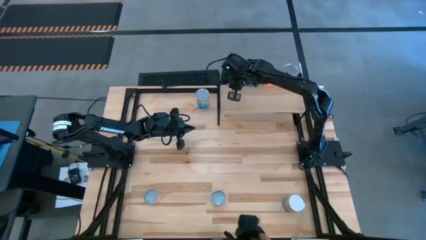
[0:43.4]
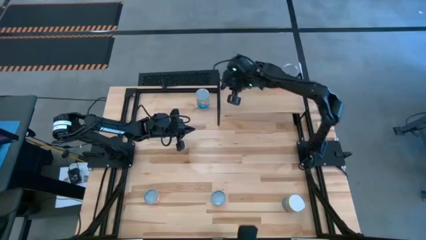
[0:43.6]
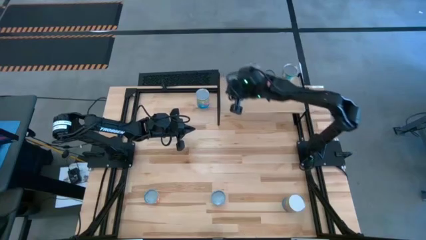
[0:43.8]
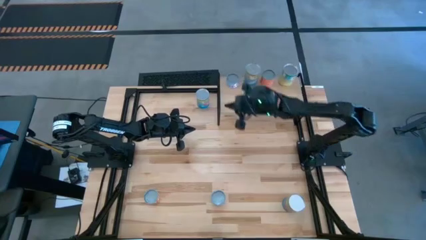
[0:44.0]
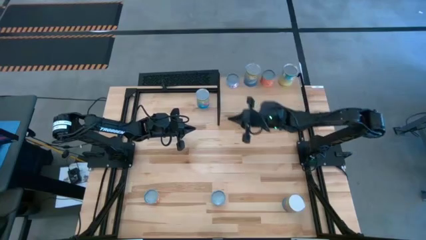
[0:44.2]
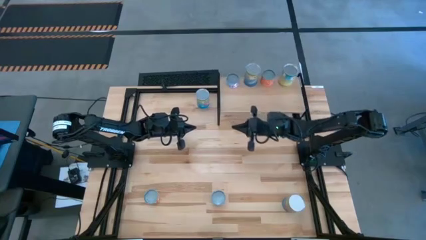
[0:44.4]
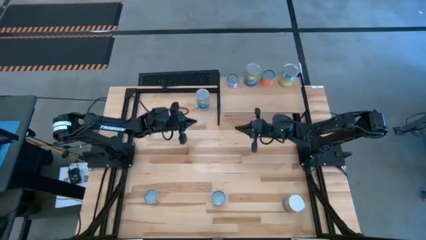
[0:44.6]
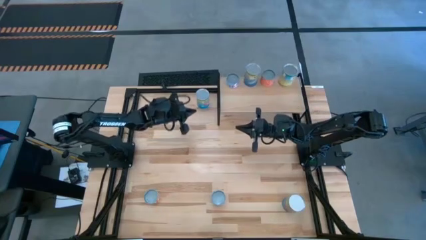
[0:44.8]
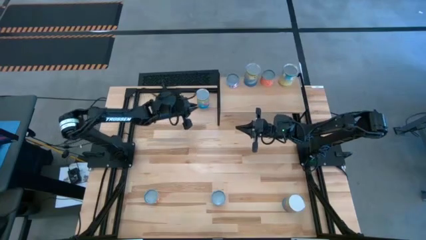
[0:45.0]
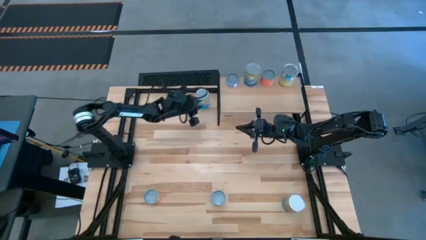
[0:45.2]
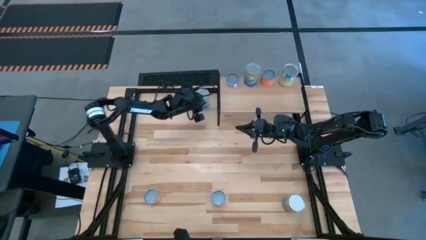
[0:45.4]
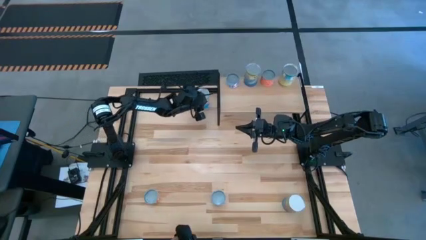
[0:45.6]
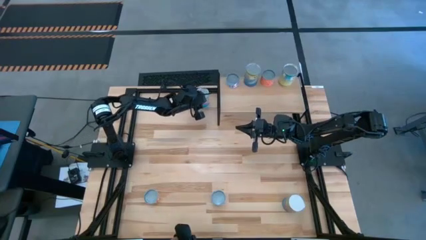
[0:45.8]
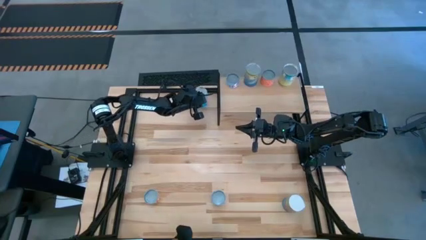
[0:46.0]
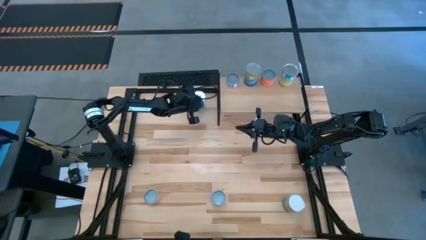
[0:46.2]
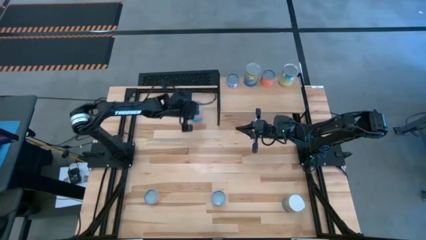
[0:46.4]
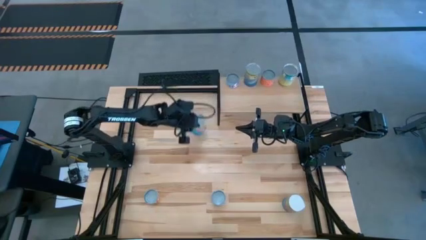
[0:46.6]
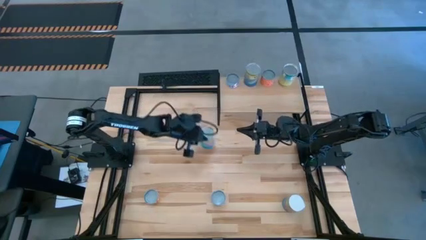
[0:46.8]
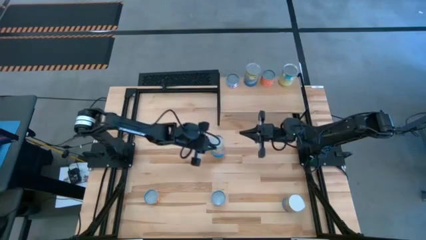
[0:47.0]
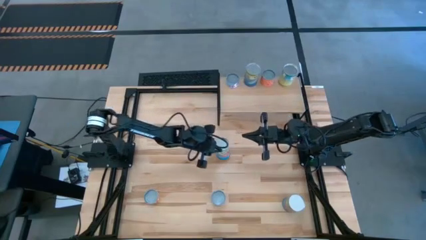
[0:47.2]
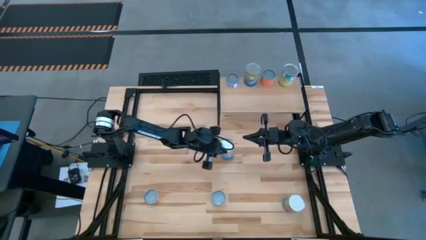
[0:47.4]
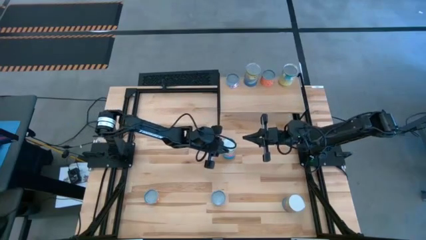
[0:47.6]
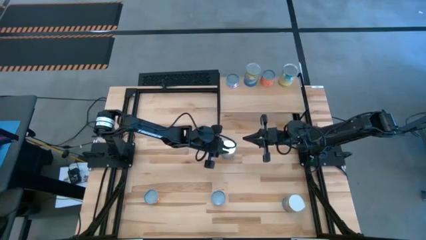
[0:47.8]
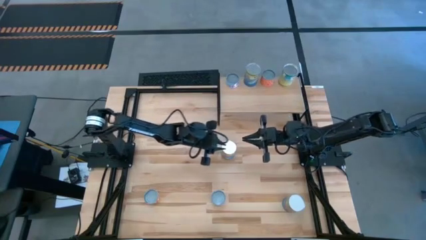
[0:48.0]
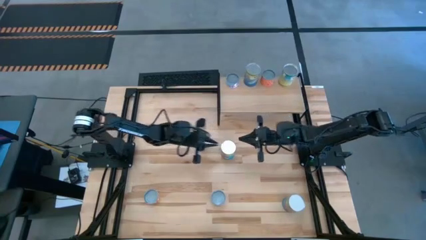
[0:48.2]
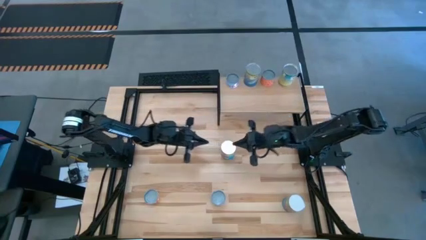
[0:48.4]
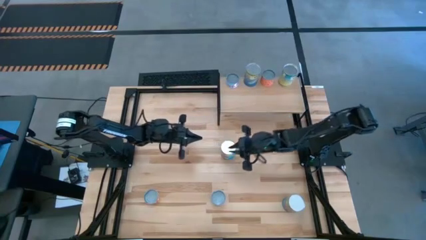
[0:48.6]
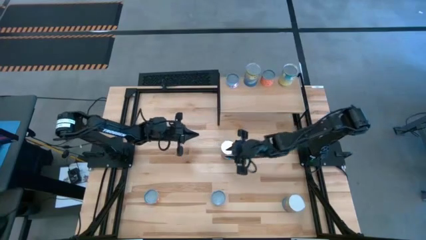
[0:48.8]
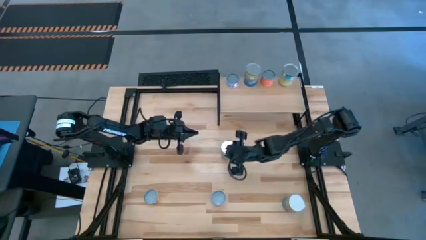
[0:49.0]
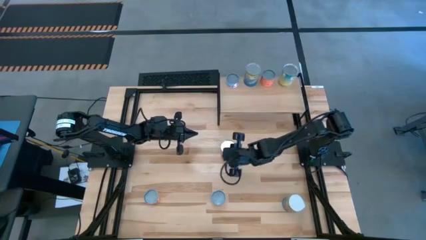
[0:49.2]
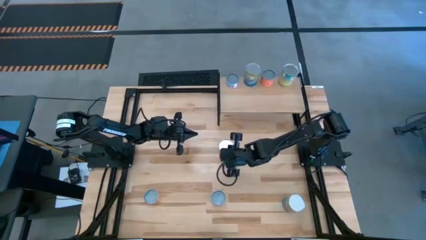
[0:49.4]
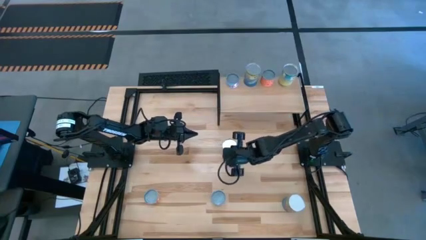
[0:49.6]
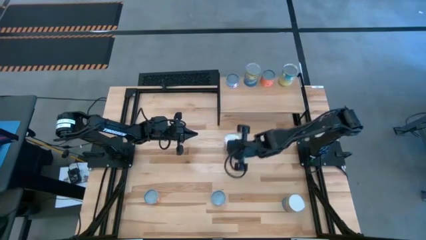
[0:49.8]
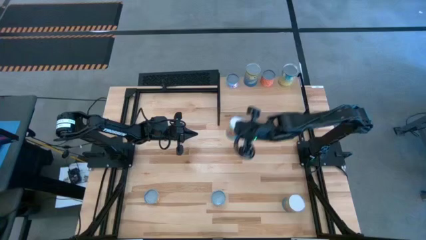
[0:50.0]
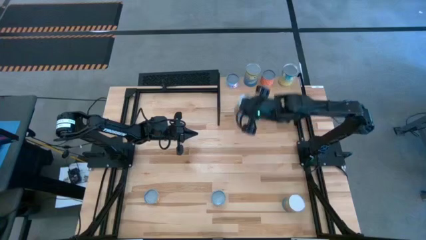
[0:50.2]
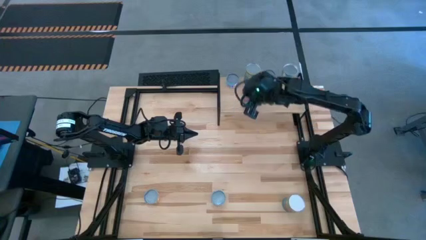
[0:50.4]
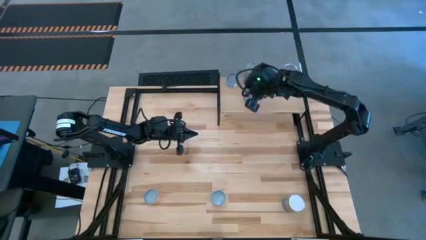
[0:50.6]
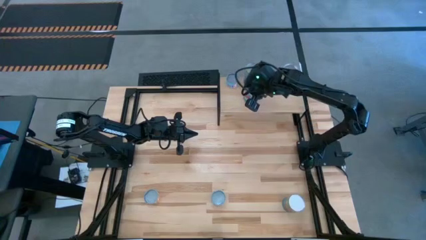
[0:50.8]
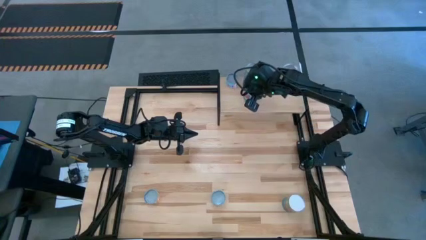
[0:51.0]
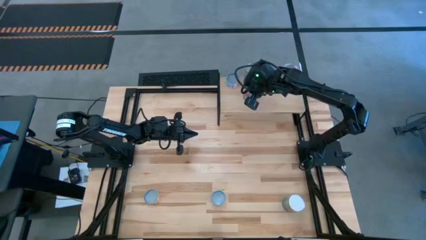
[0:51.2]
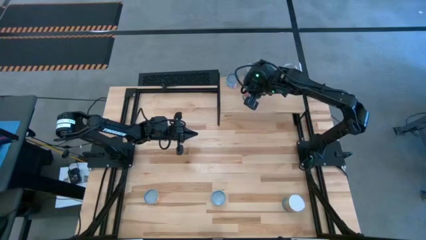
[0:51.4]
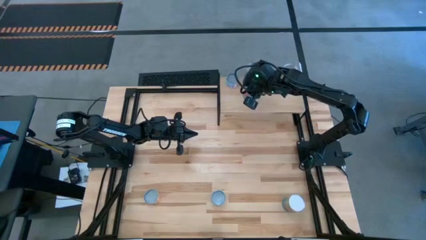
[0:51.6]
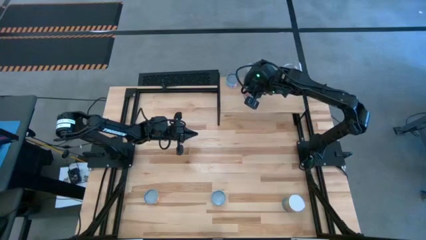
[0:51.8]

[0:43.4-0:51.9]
Task: Pick and place cans onto a shelf
Put the top canned tomatoes on the shelf

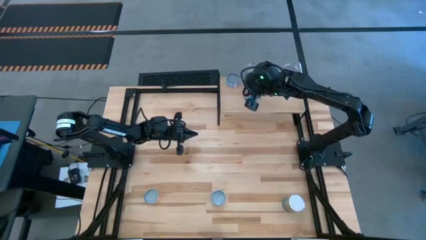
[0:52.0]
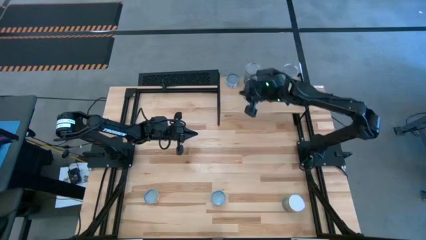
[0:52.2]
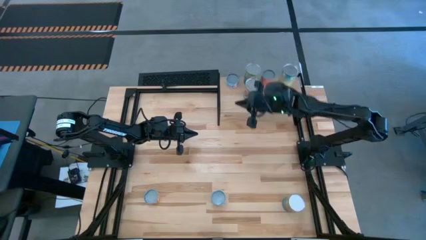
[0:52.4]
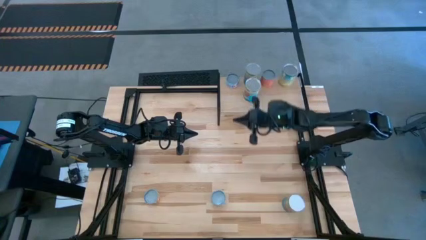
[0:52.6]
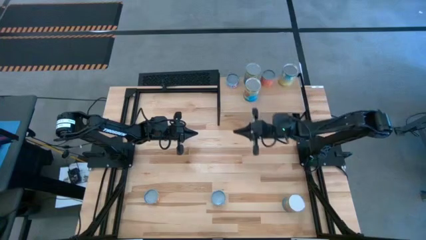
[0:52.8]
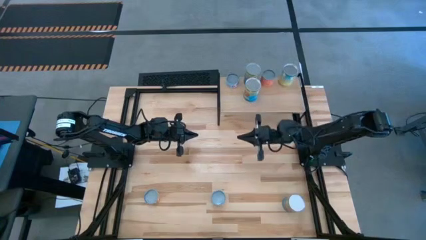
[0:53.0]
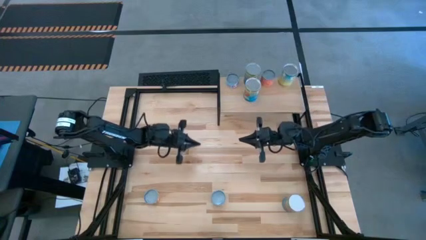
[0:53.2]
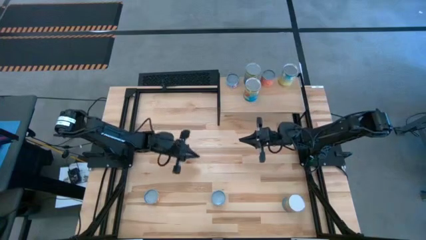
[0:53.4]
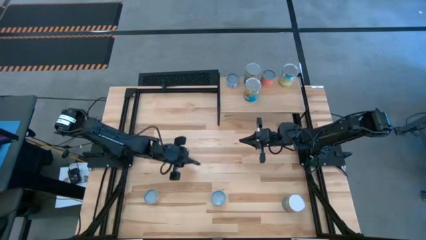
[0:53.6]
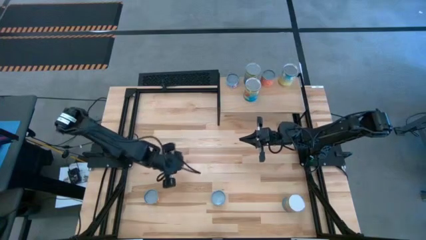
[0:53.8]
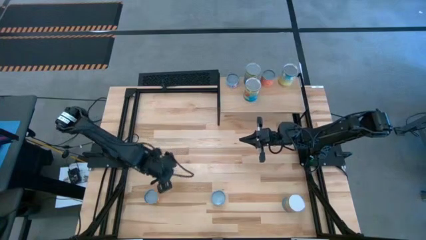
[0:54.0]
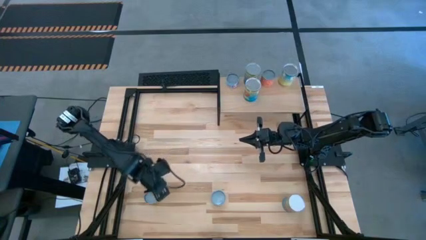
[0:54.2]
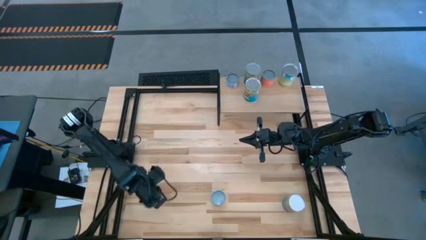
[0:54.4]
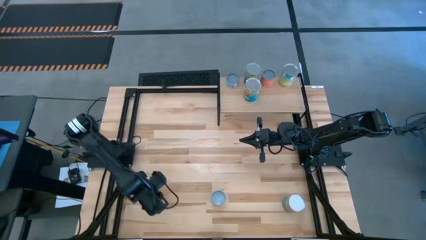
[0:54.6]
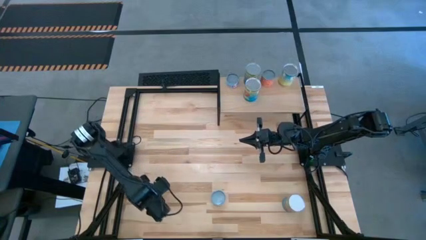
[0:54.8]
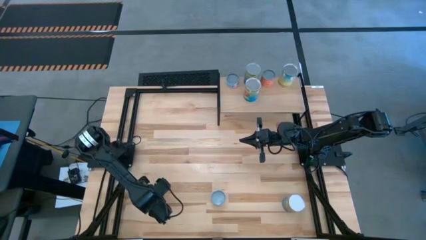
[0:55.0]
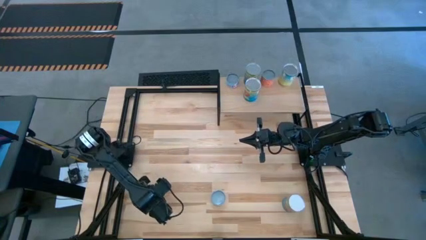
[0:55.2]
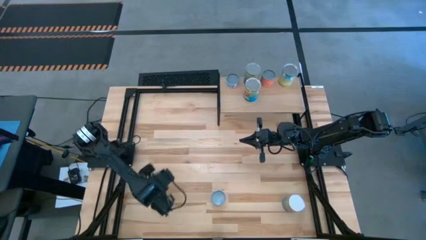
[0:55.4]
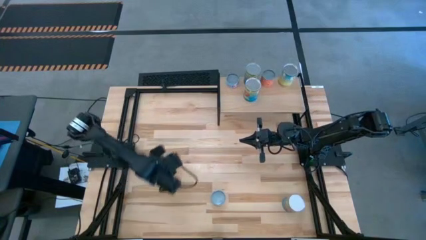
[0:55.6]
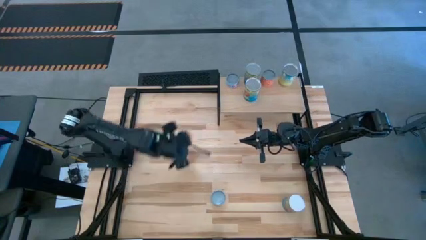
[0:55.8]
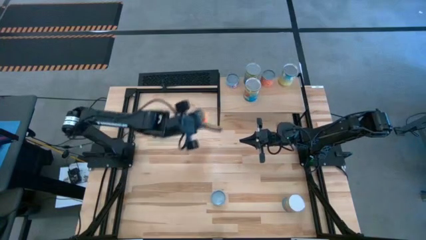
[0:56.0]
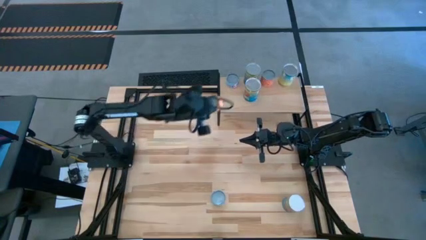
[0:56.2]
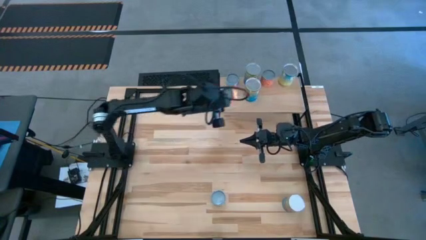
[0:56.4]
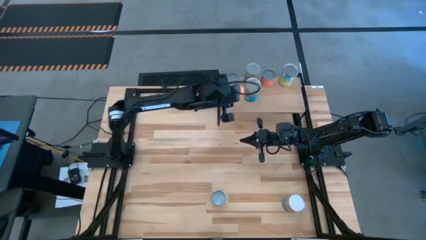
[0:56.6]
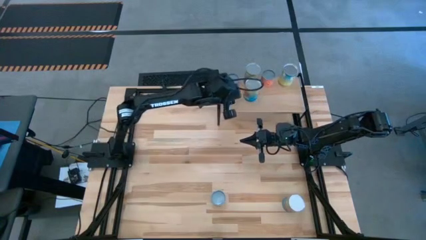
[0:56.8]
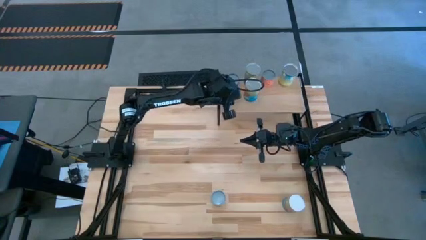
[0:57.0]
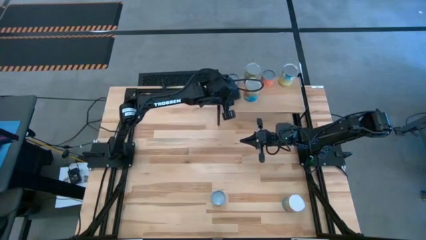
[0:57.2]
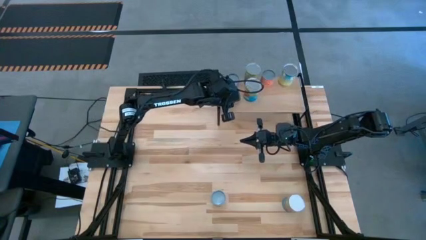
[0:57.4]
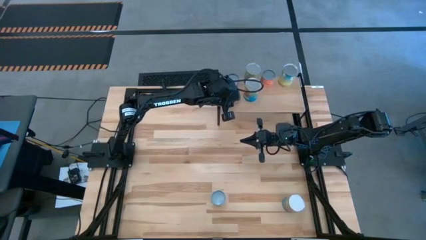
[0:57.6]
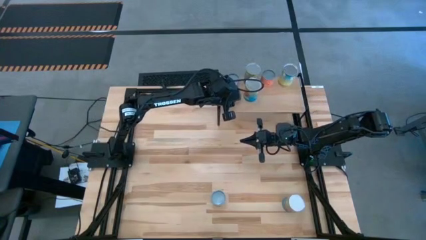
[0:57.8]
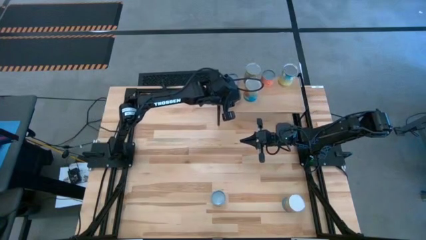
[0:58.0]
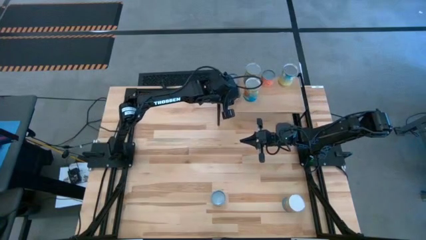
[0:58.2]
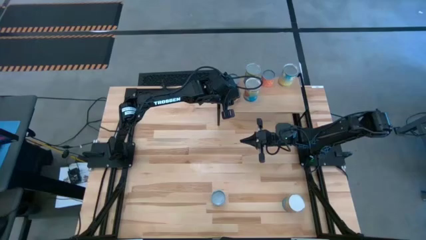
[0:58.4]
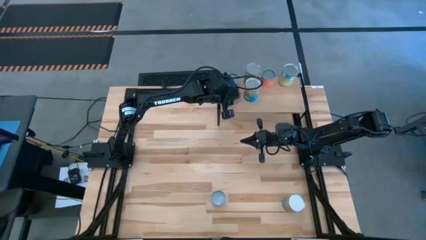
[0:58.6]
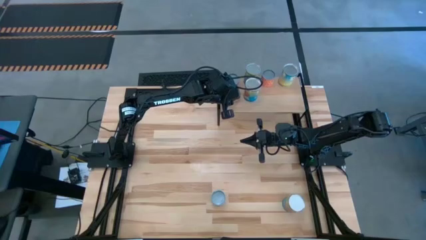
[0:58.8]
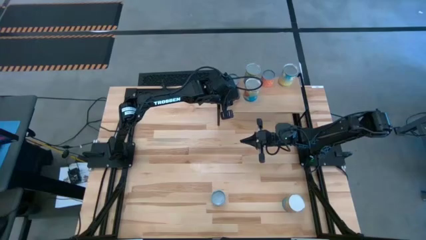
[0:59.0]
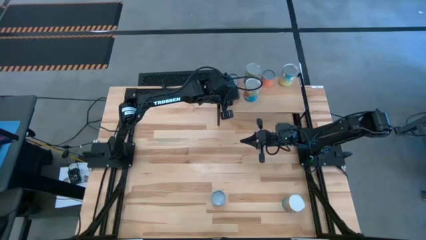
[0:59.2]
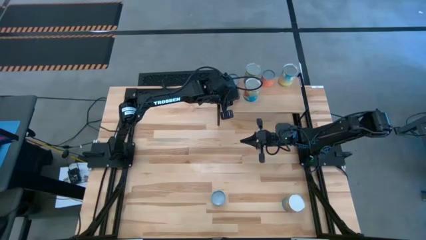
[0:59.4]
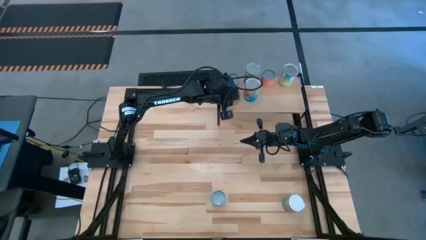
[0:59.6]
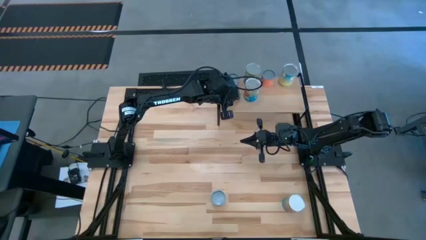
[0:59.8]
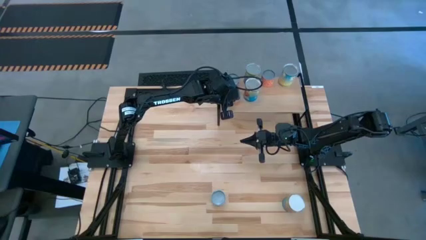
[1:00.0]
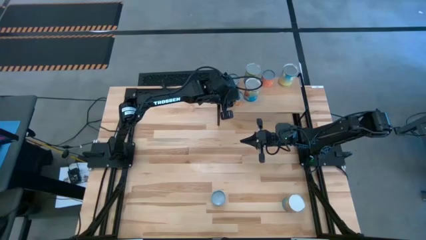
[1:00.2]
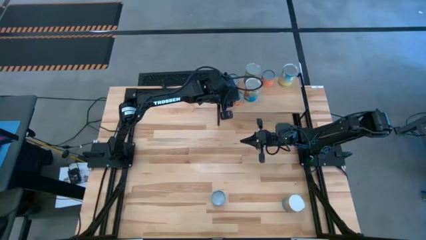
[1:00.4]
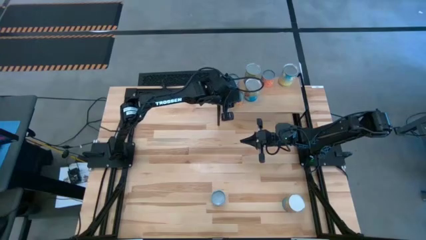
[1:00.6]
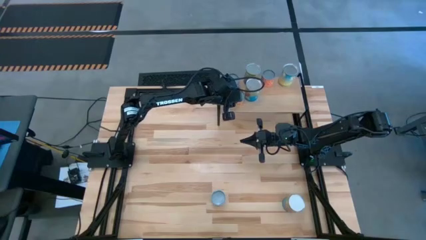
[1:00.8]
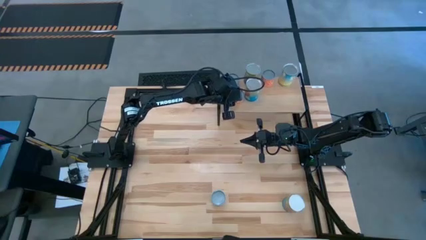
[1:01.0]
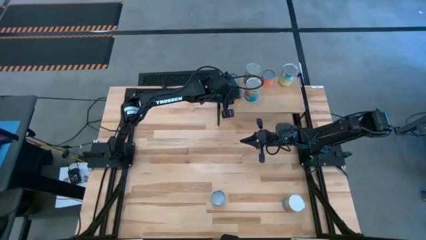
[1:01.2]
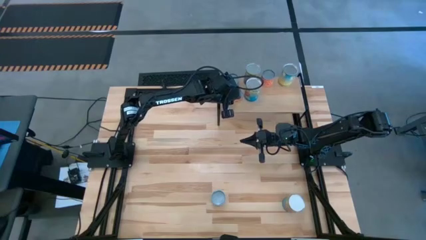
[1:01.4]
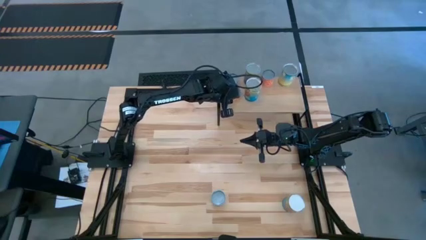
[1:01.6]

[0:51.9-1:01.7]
Put the canned pineapples on the shelf
